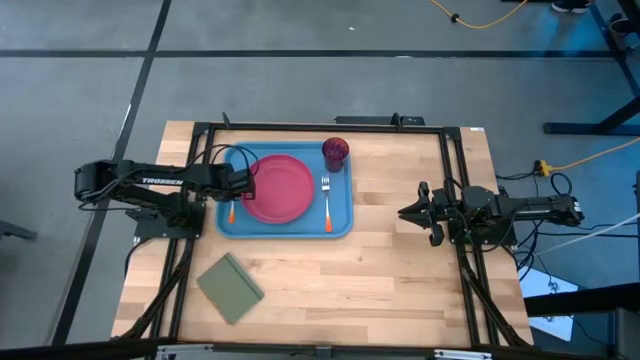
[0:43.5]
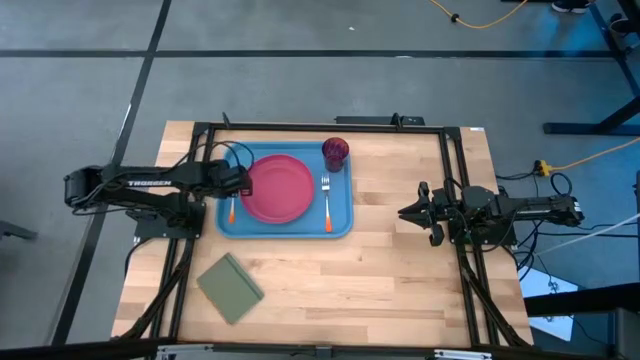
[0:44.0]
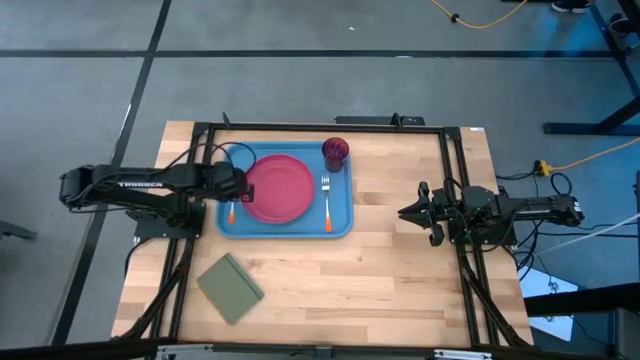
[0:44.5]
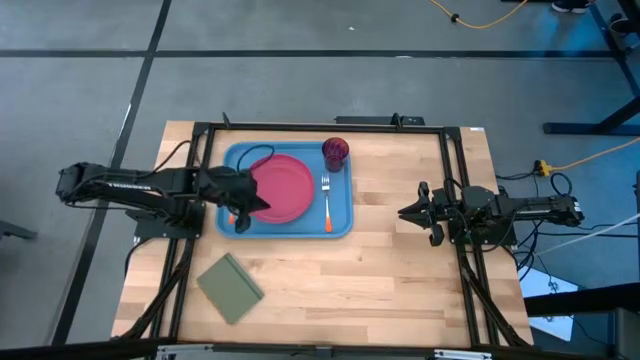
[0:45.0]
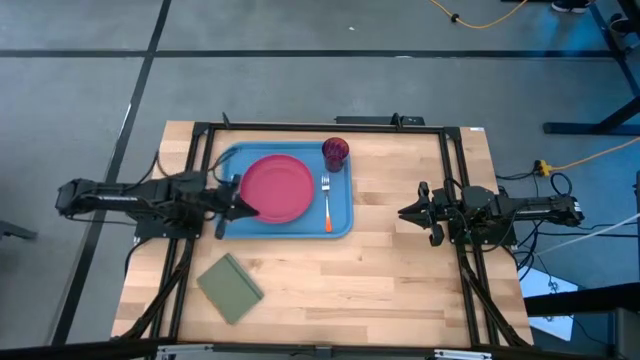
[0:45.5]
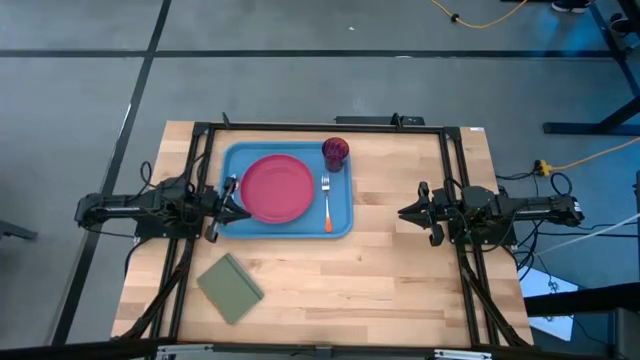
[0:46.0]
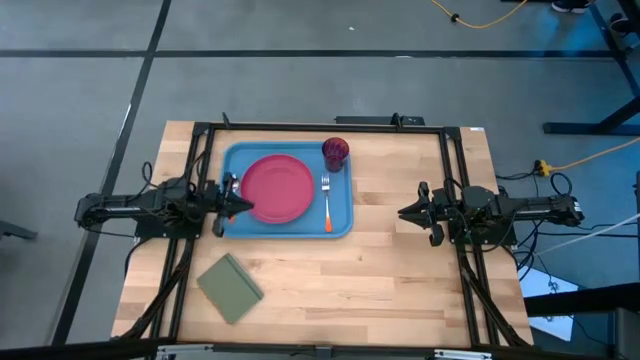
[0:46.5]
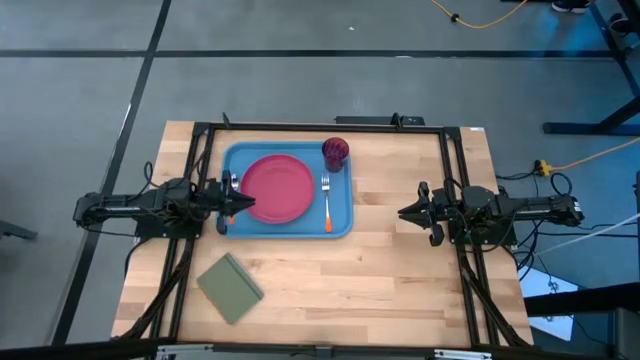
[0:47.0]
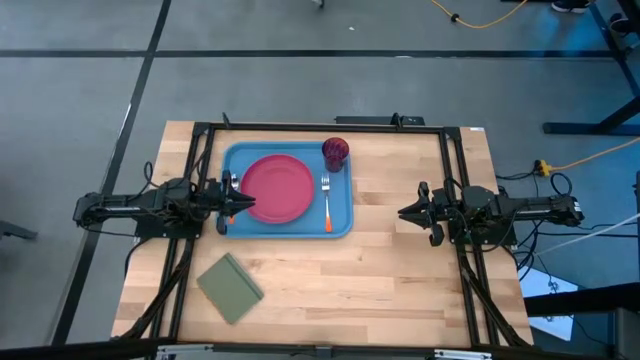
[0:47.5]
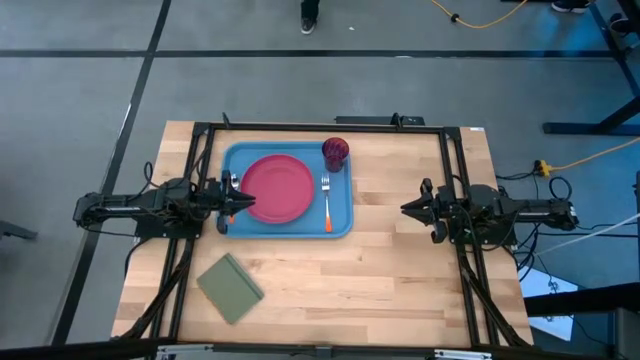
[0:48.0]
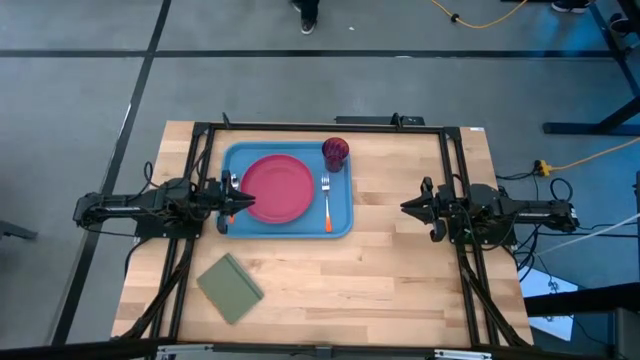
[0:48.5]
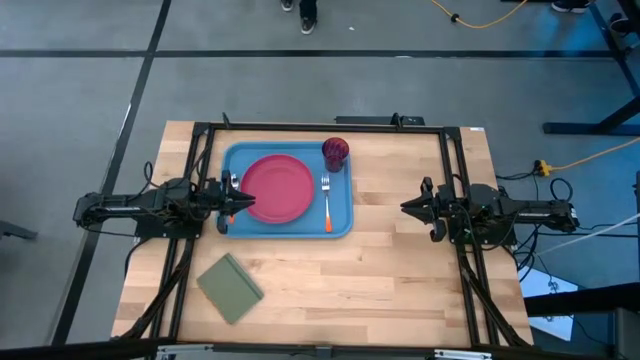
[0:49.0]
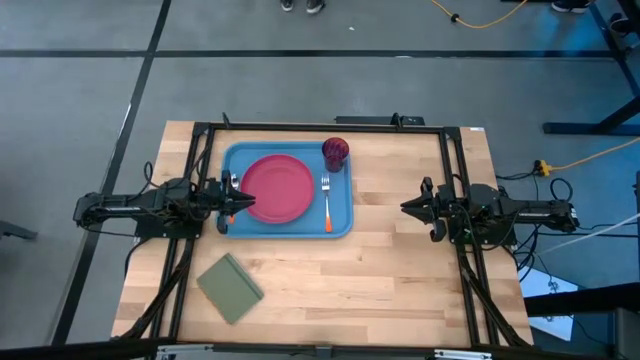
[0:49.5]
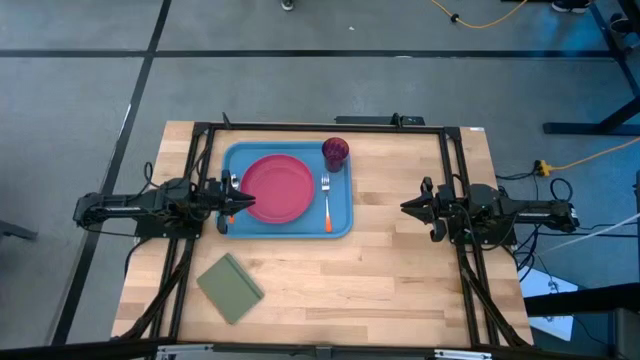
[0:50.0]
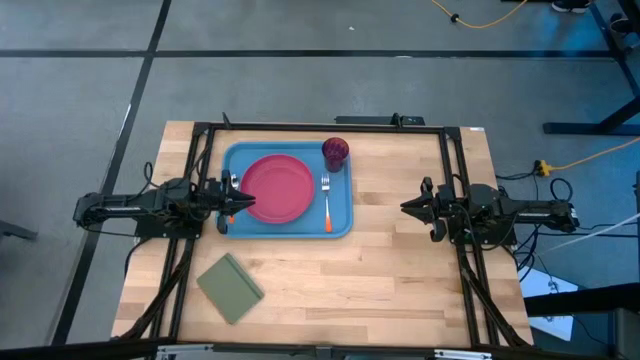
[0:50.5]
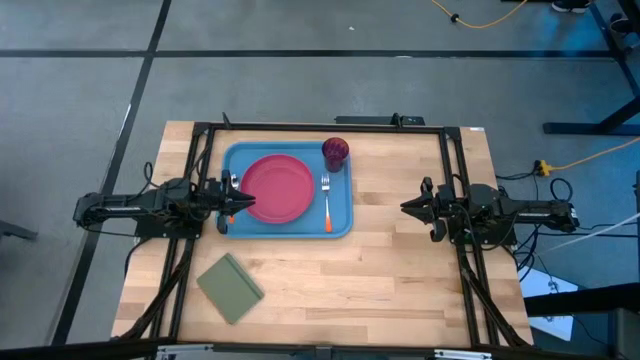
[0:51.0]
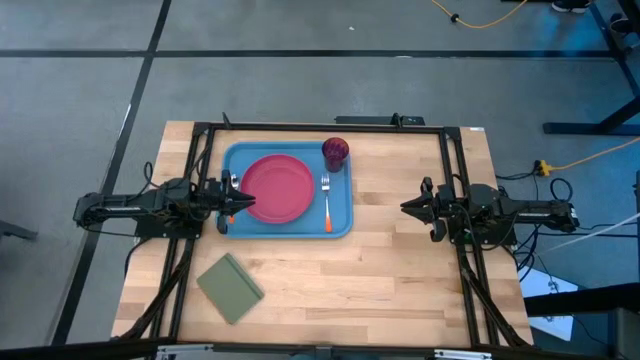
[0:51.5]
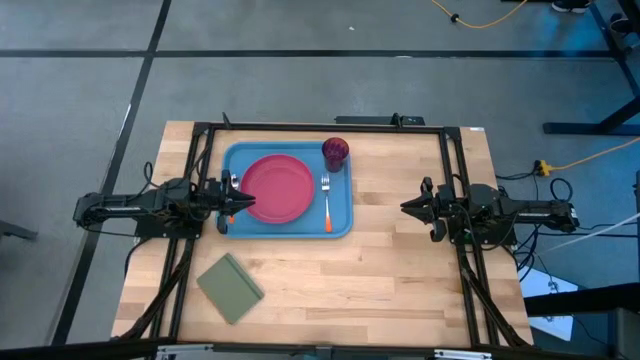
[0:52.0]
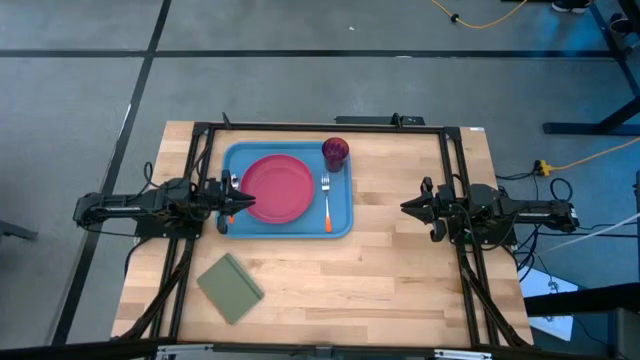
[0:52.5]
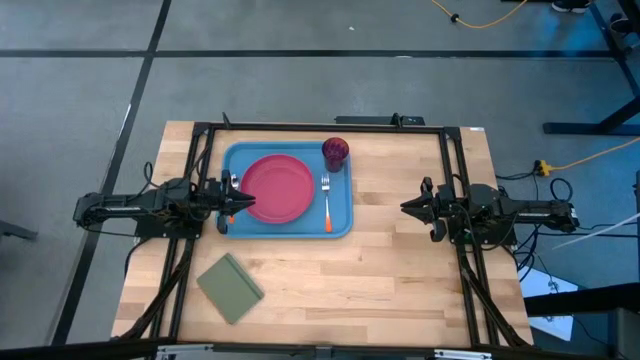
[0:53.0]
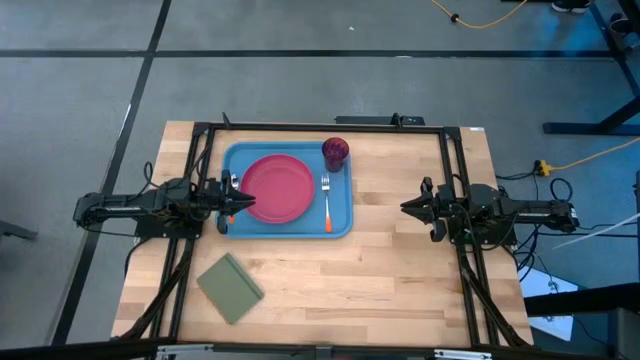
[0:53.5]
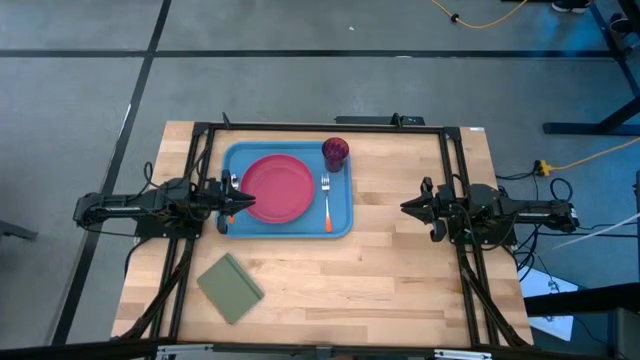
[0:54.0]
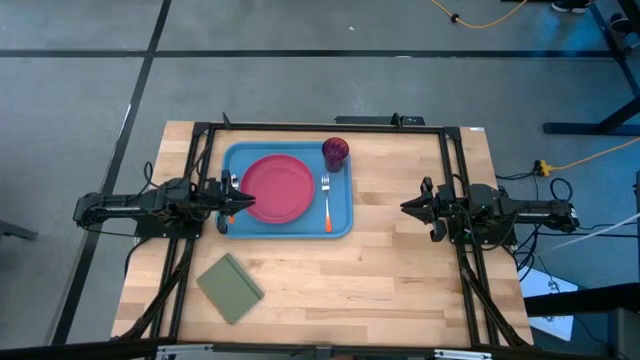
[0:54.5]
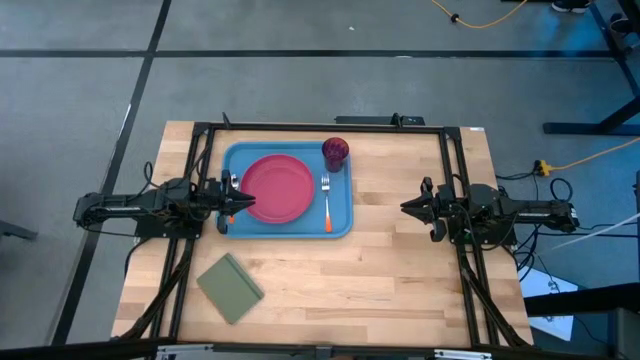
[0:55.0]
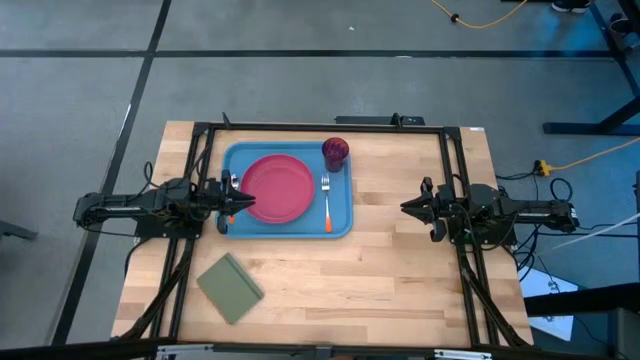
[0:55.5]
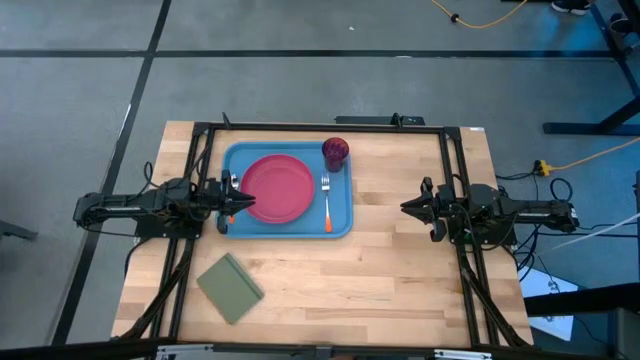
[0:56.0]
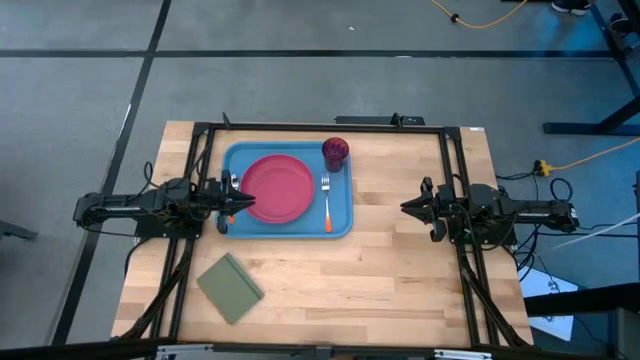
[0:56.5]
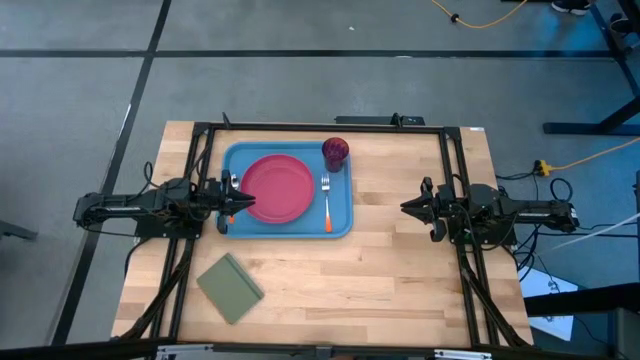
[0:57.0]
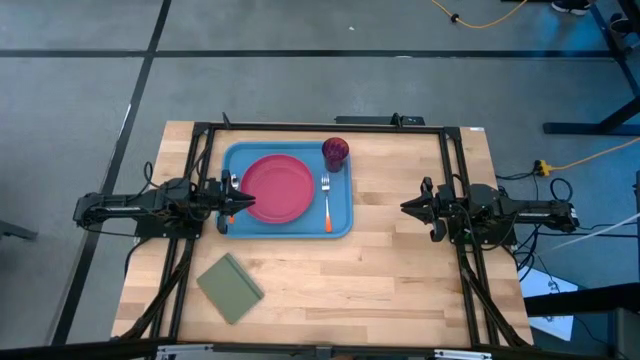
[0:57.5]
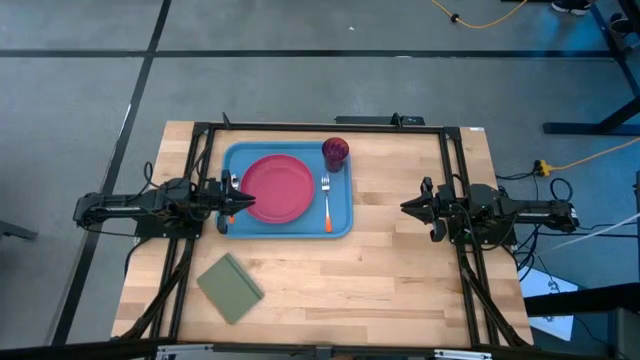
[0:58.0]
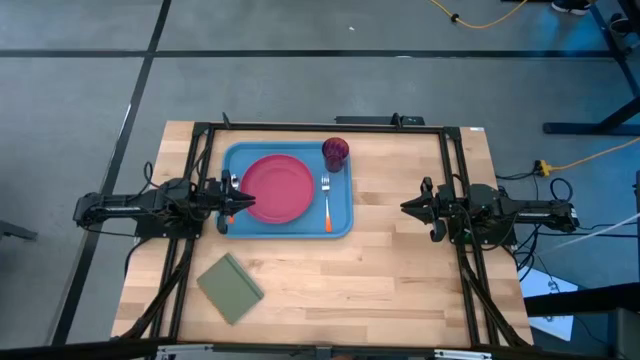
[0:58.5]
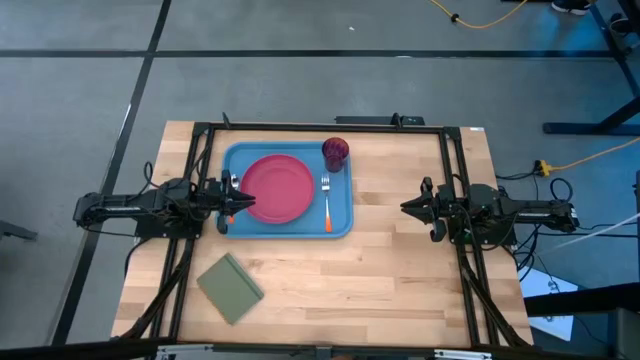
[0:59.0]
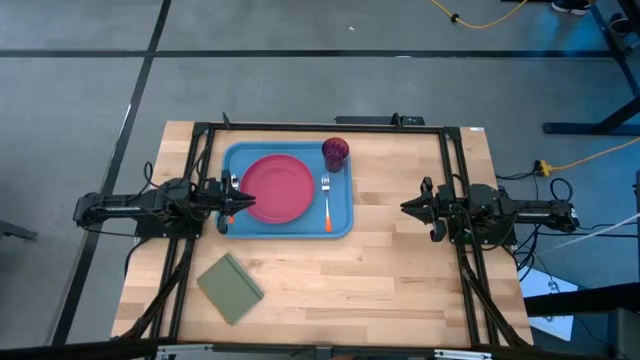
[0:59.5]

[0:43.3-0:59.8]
Task: Pick and place plate/cup/fork/spoon on tray
Return to Home Position

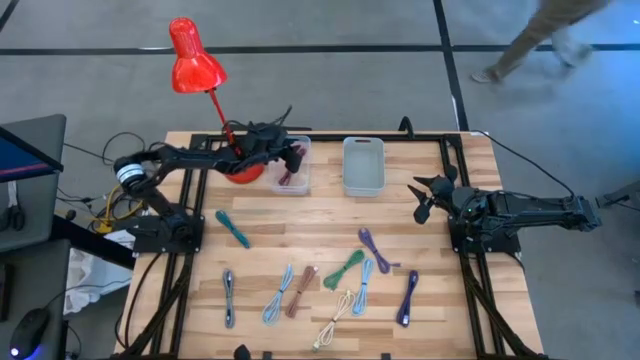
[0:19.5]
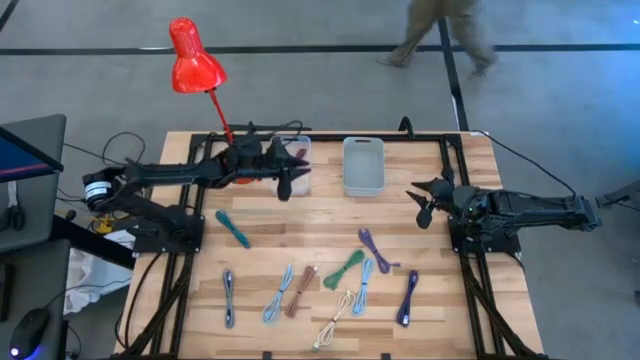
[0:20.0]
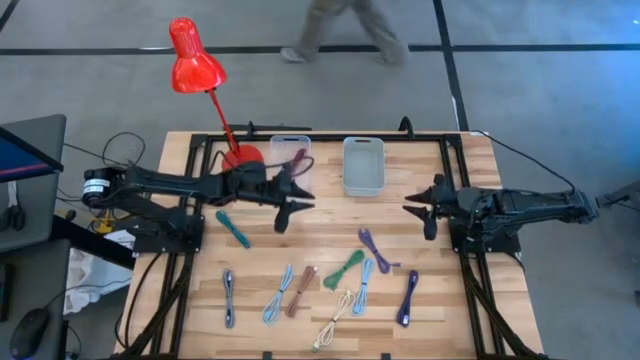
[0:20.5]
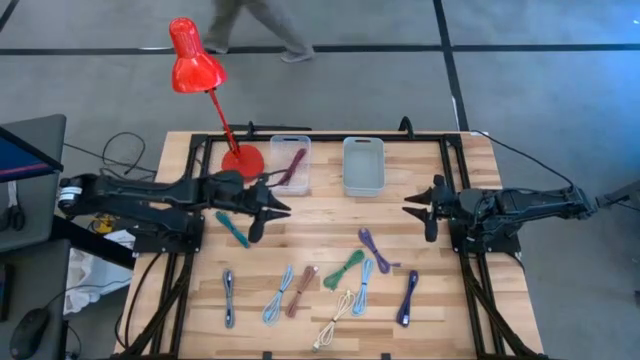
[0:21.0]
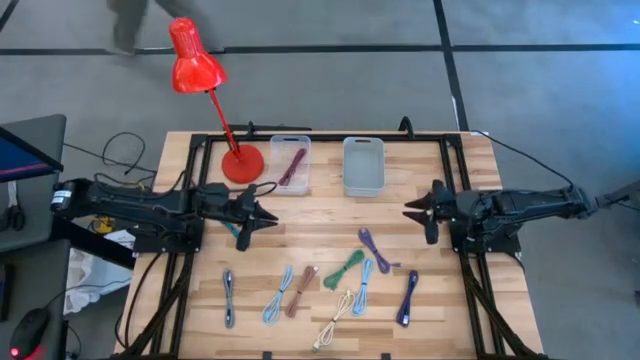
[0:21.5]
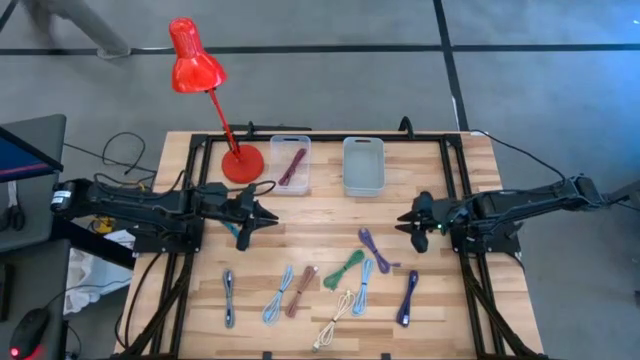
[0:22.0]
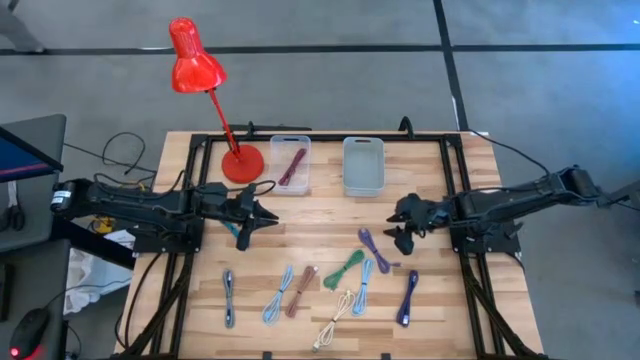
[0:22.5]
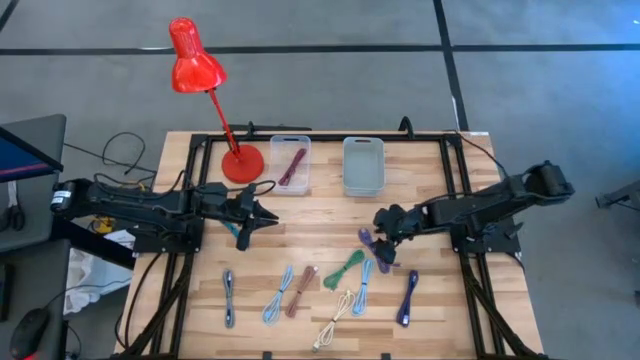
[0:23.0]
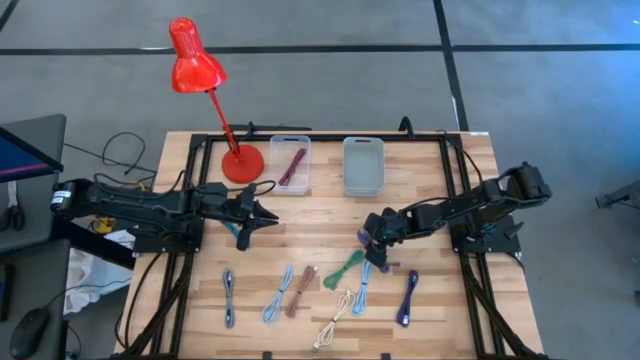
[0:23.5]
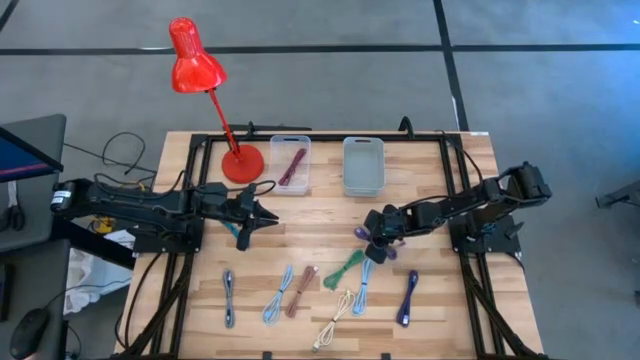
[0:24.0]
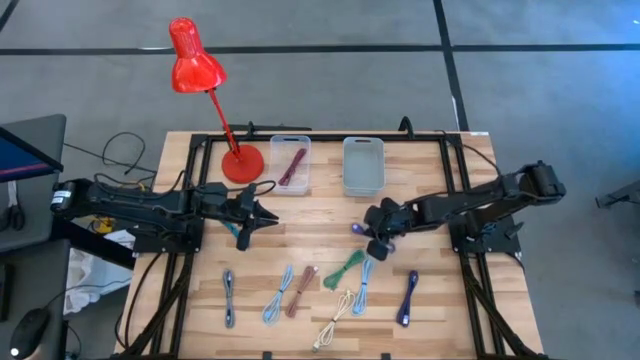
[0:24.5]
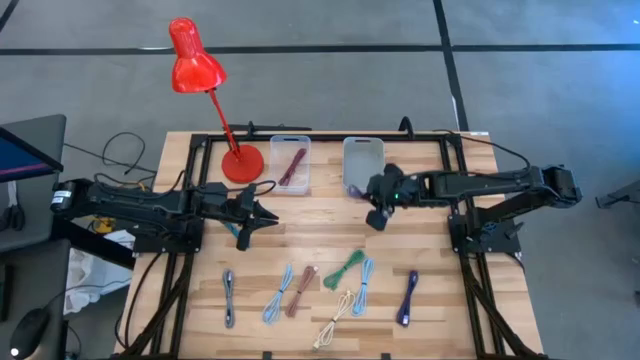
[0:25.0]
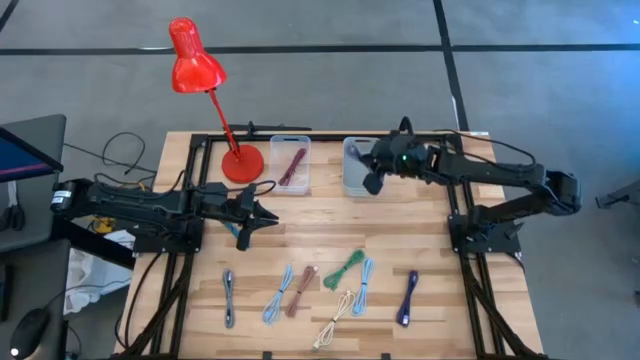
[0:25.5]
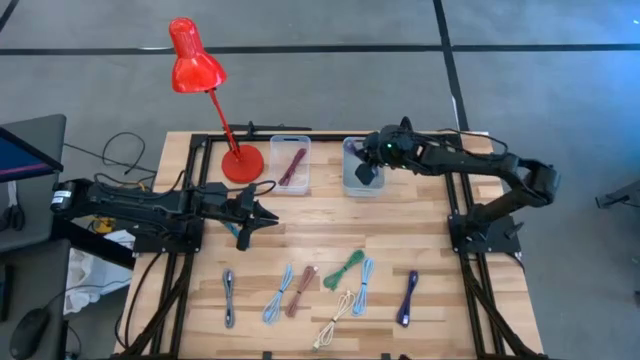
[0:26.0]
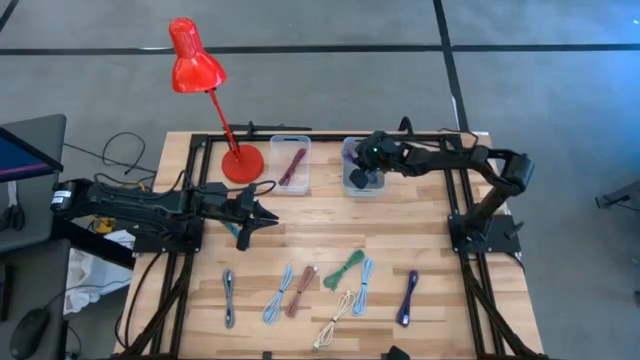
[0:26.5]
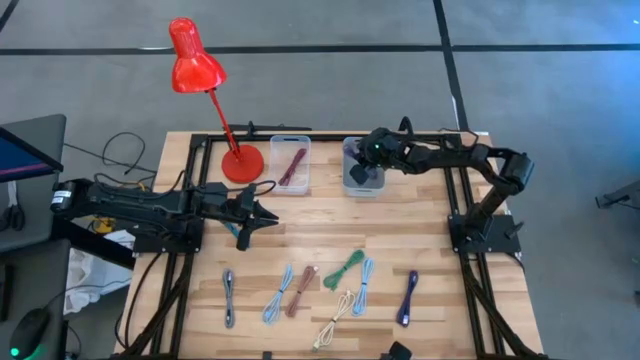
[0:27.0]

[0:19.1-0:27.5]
Task: Pick & Place USB Port
Put the purple USB cable into the gray bin
